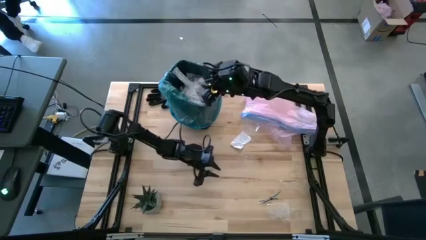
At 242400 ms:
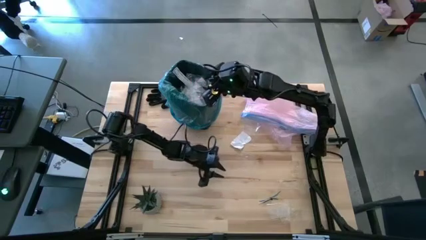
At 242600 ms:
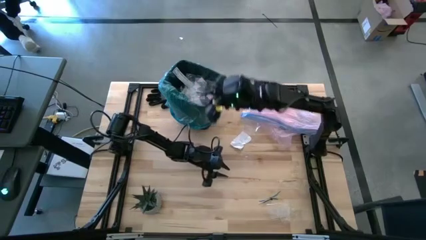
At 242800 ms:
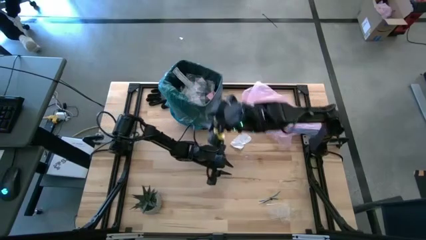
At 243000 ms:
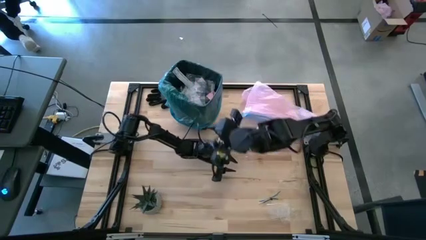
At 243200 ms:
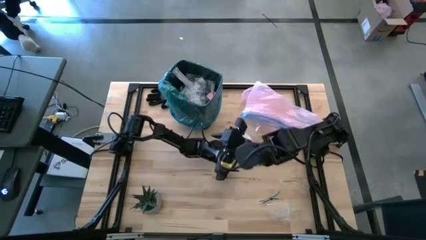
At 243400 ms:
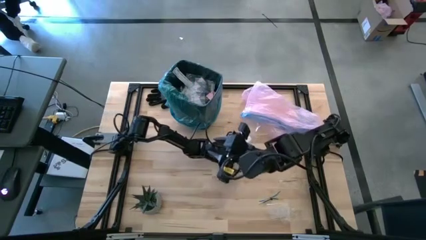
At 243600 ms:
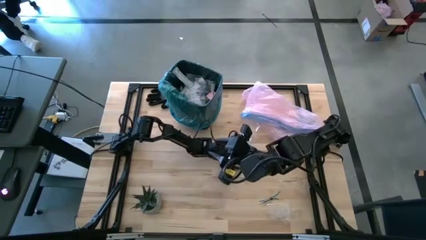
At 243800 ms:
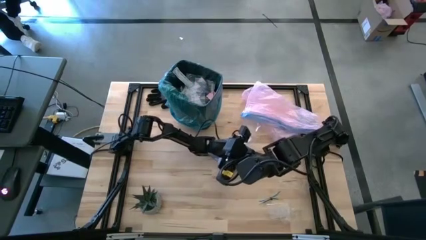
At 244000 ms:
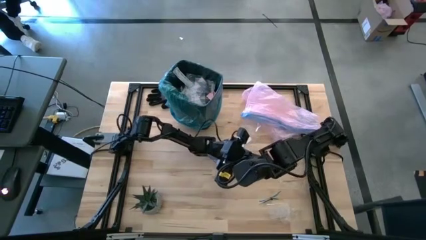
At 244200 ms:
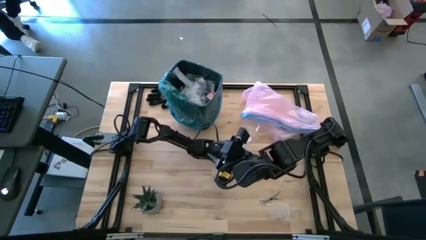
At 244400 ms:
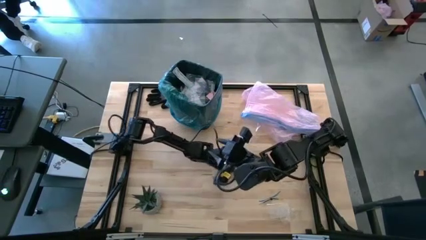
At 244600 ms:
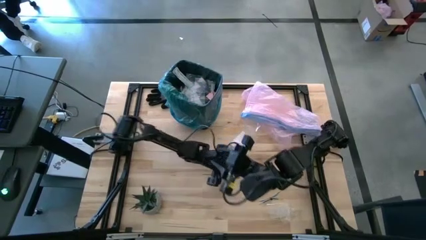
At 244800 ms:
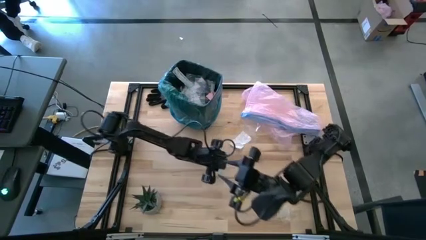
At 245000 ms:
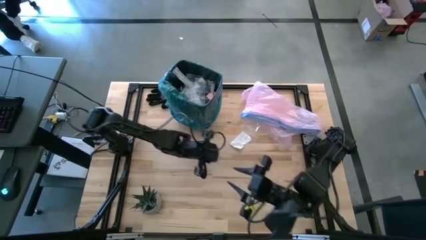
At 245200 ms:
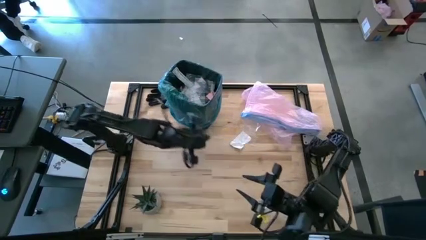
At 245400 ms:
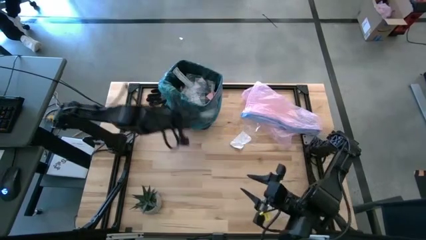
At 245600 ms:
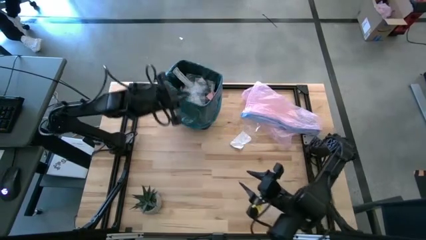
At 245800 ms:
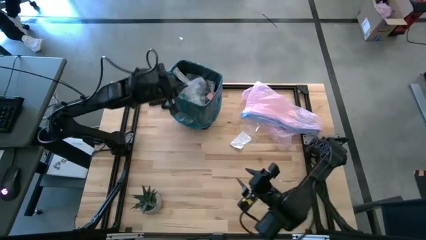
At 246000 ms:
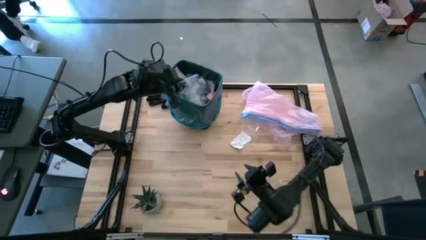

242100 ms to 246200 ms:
Task: place trash/remove bag and relplace
Put the clear plastic into the trash bin

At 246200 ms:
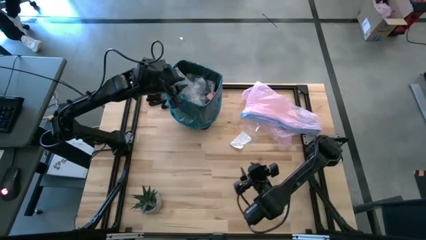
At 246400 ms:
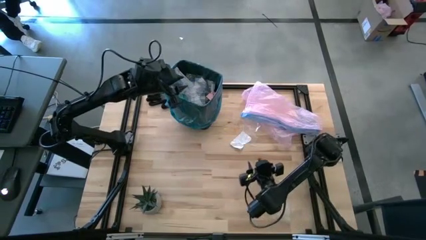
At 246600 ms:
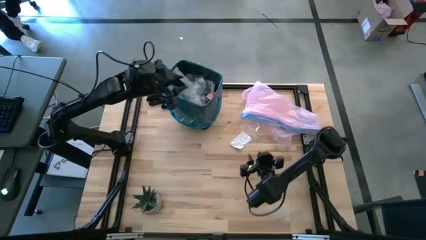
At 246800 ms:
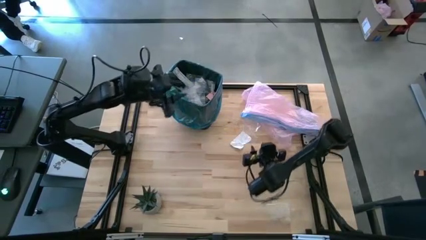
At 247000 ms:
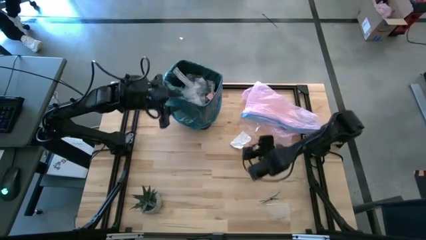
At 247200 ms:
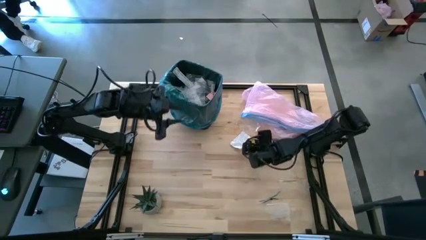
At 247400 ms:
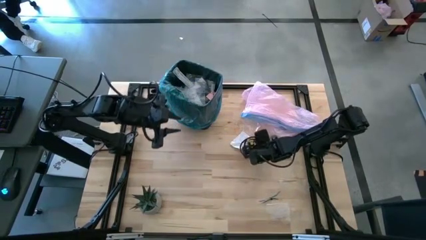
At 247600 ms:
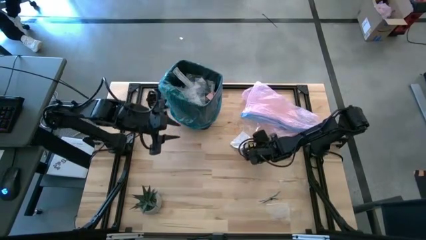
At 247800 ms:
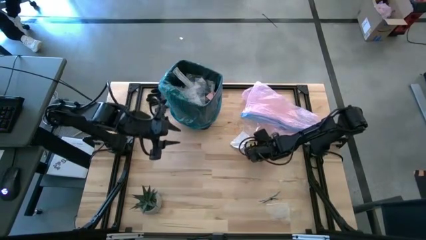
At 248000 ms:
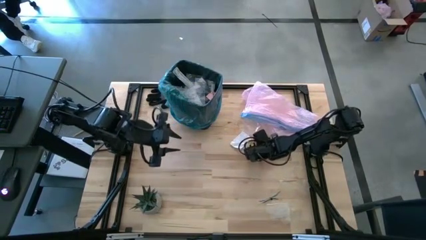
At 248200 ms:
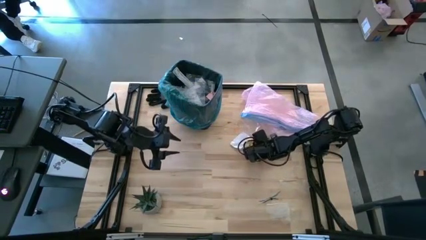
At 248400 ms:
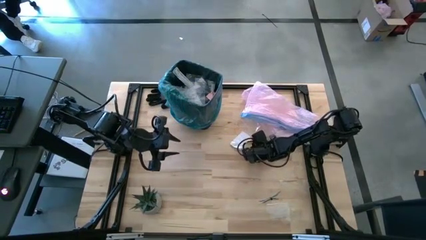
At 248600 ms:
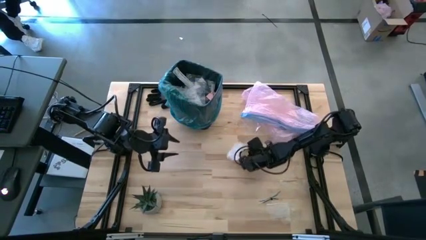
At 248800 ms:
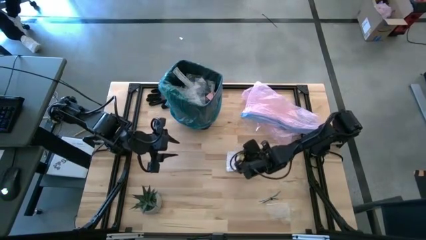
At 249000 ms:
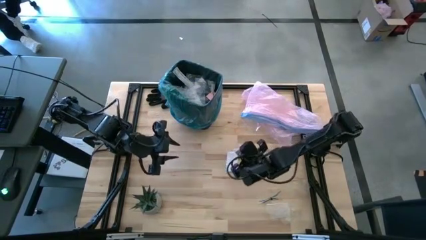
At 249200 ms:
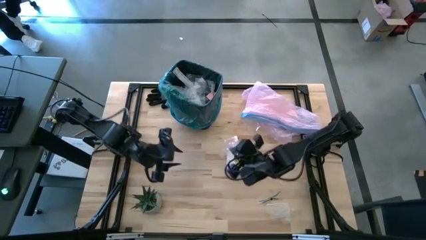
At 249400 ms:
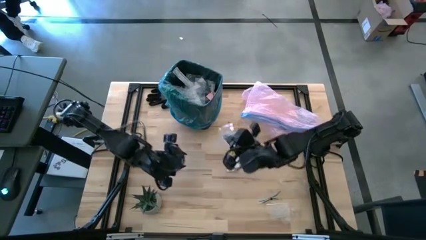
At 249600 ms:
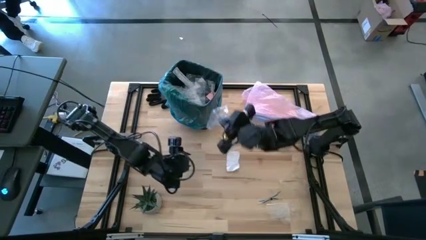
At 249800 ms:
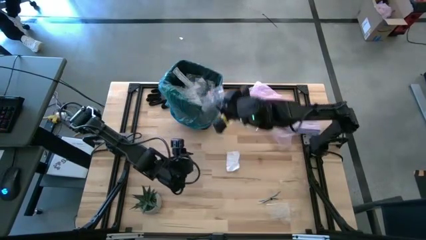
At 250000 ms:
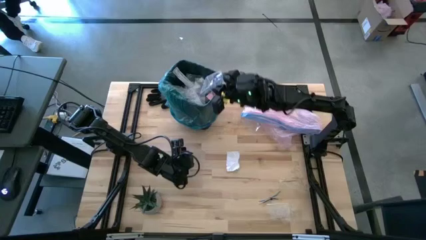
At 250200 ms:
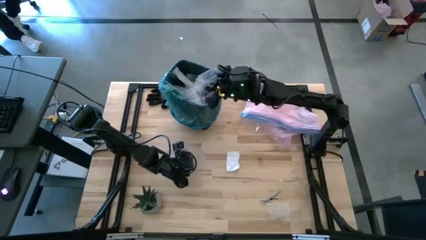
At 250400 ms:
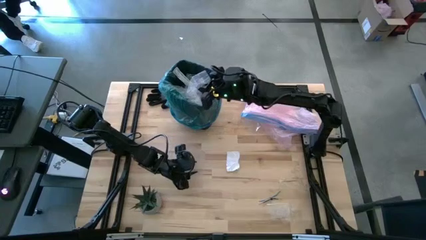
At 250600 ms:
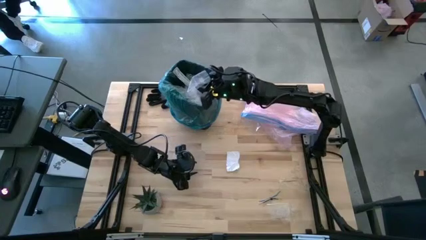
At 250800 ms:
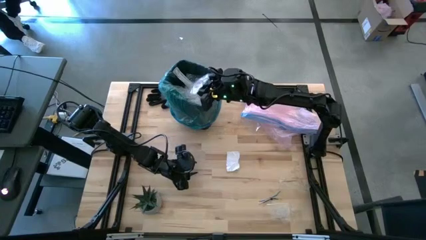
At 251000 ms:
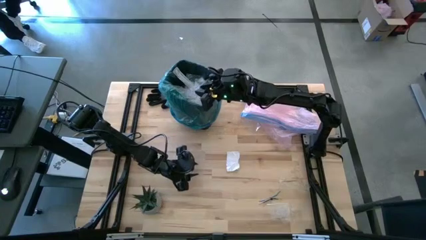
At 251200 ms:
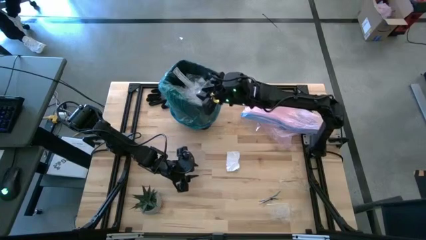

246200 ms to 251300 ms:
Put the clear plastic into the trash bin

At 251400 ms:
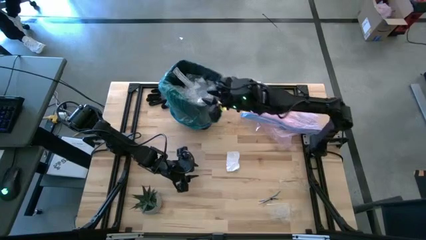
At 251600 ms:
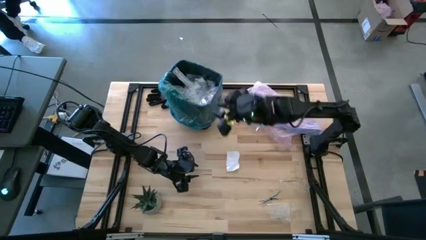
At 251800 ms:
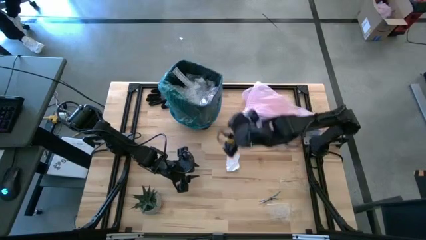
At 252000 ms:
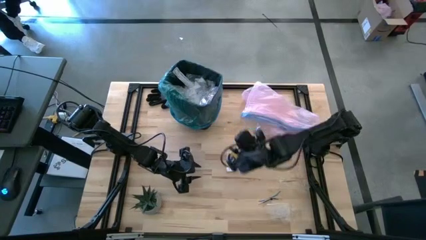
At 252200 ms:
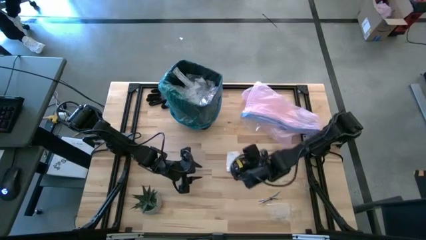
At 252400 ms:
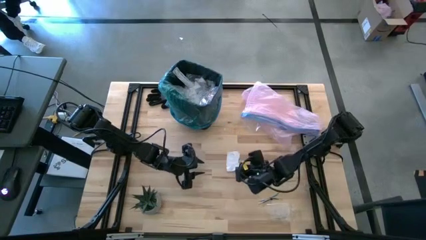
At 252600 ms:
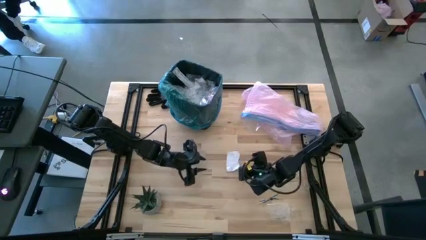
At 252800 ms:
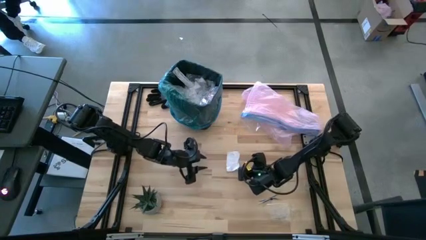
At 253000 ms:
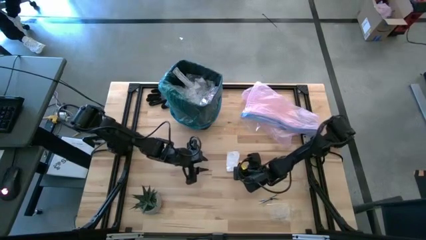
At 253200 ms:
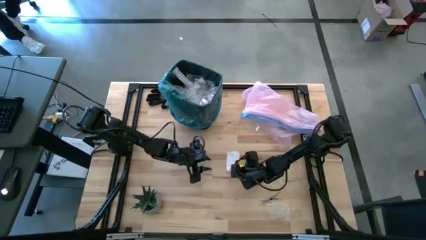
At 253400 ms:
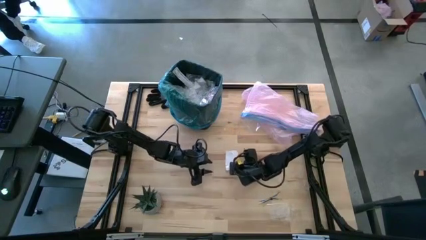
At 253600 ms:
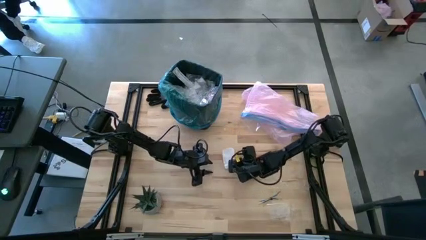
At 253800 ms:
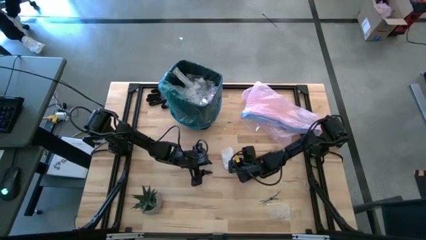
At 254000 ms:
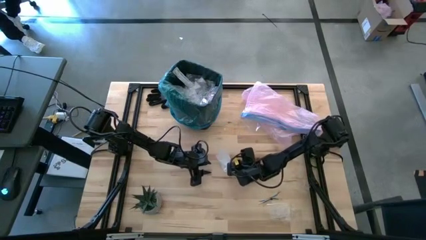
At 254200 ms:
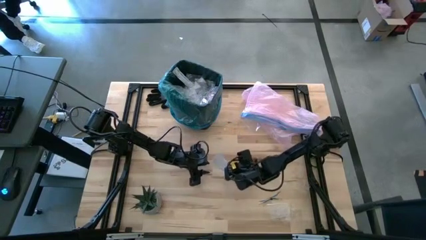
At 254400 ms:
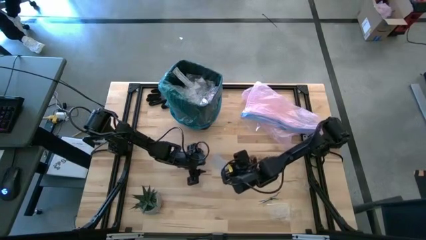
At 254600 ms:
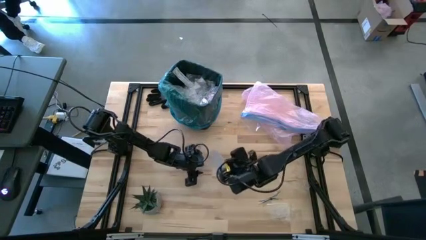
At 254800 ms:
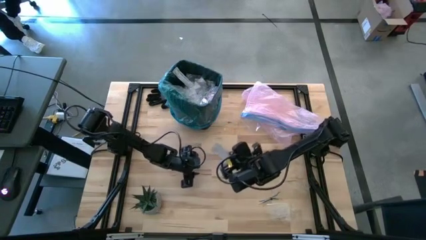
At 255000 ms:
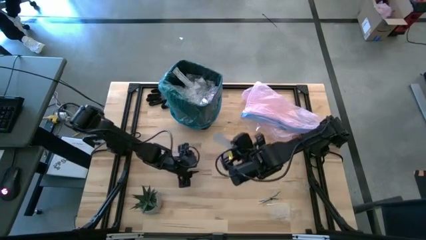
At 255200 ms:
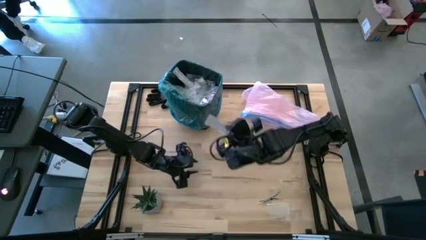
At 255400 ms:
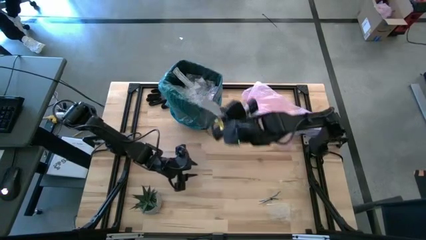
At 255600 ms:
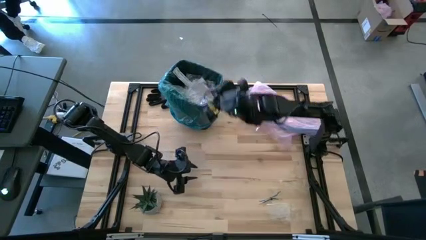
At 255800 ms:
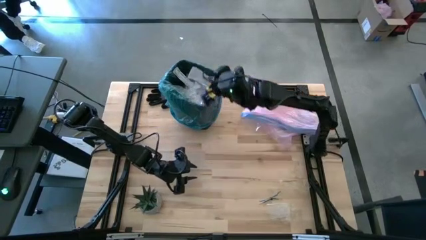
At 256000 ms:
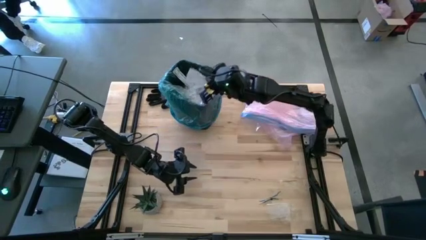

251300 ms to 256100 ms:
Put the white paper into the trash bin

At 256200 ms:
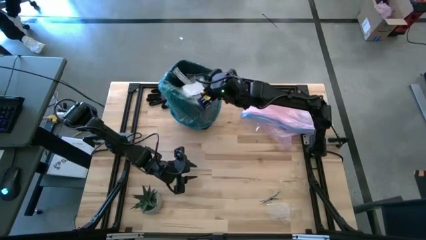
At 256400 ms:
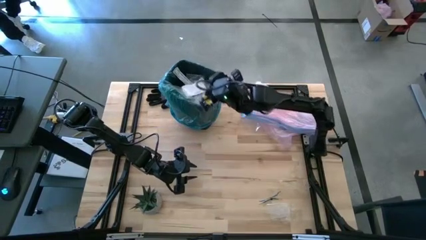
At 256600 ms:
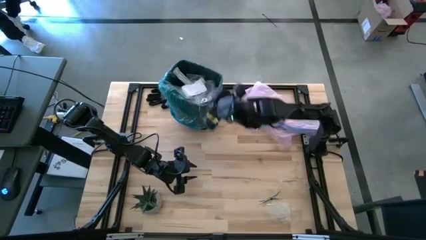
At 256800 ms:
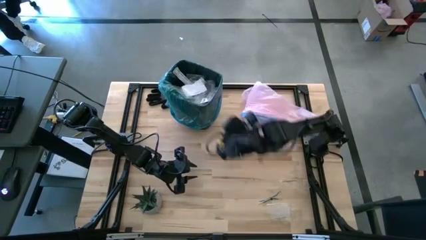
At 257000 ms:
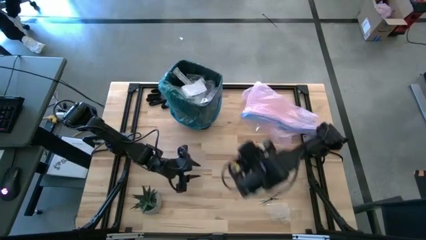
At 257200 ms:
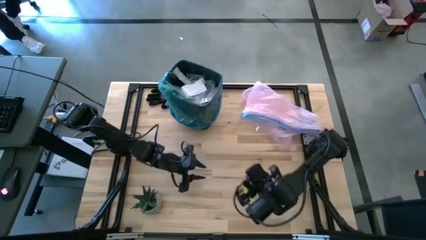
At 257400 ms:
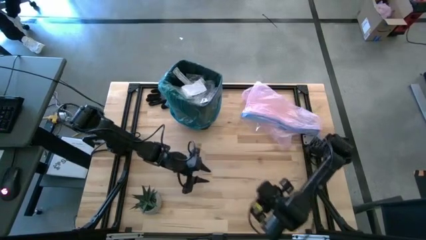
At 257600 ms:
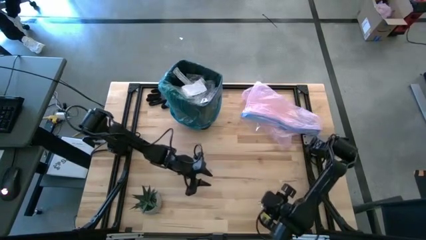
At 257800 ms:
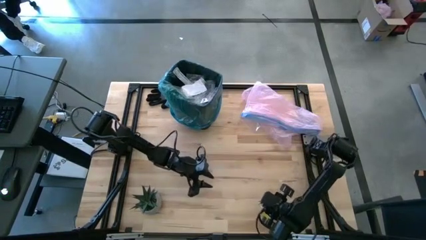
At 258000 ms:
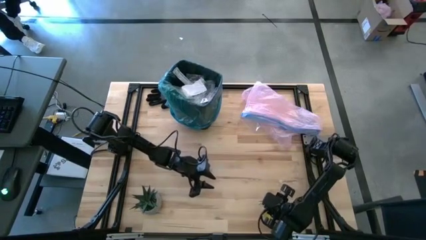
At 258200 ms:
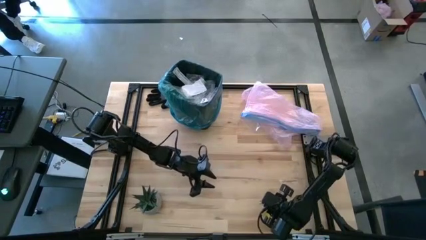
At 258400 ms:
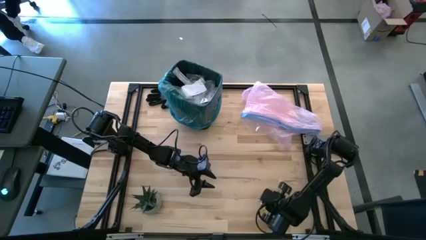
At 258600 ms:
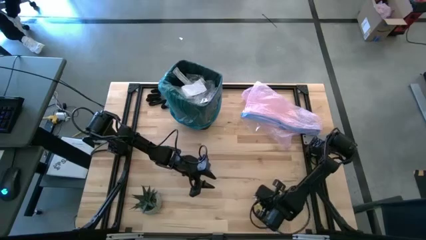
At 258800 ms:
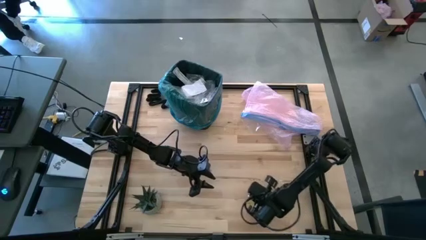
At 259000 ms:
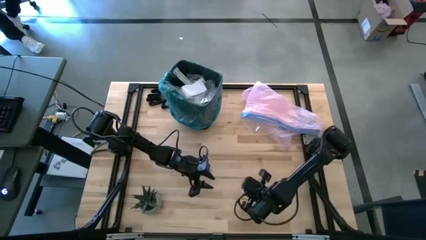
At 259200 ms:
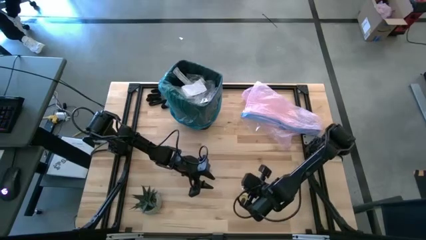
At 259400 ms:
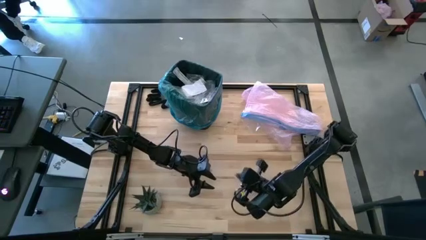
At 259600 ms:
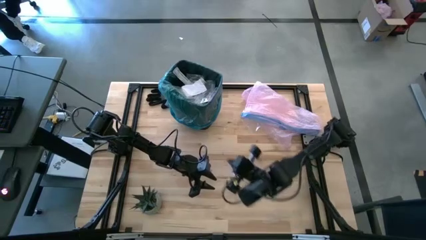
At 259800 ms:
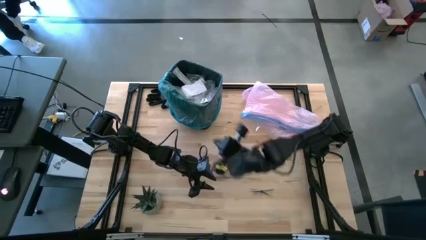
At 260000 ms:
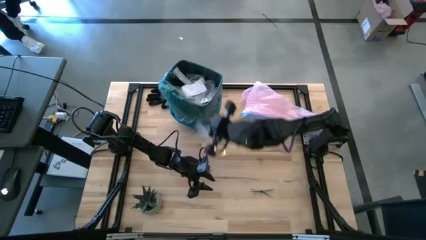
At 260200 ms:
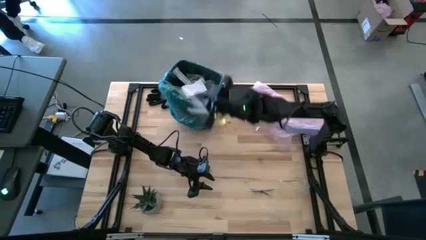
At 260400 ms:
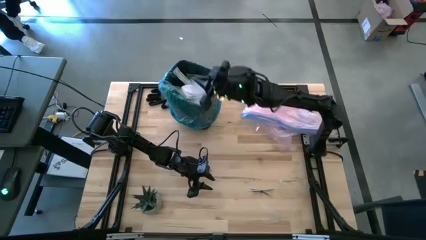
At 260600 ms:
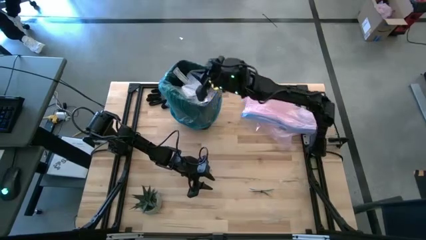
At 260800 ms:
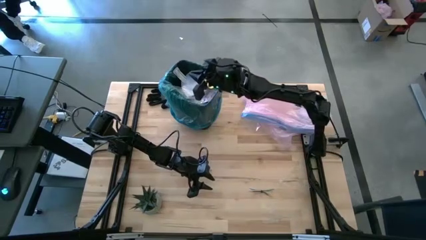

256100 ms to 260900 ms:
Put the clear plastic into the trash bin
